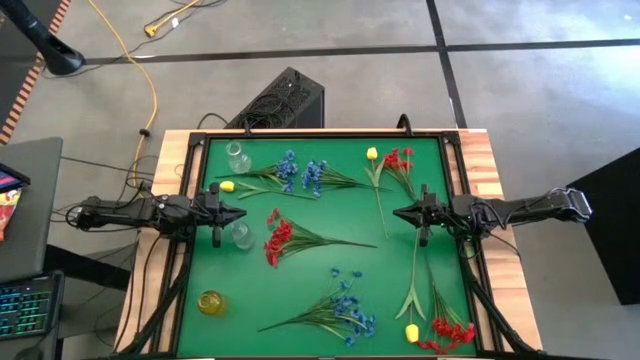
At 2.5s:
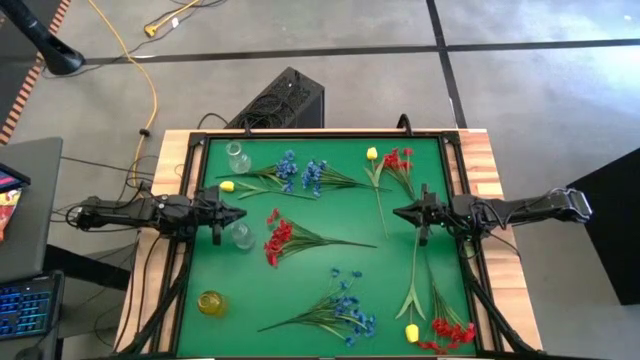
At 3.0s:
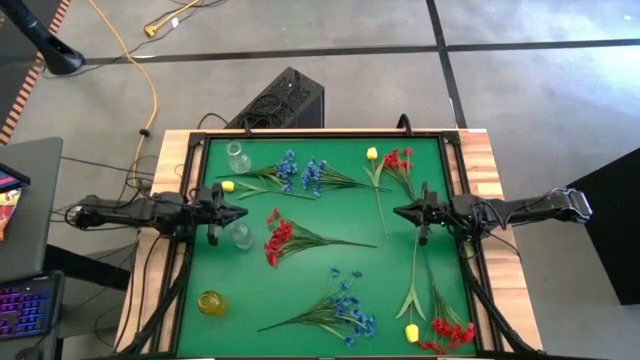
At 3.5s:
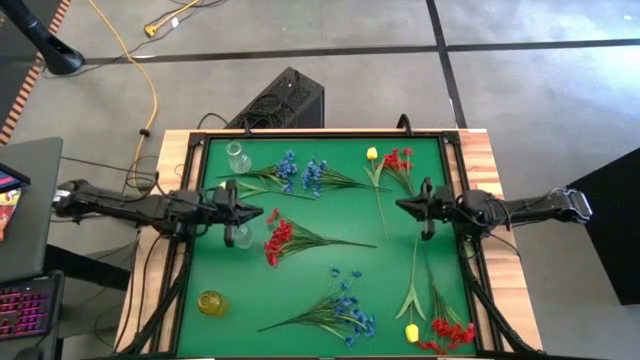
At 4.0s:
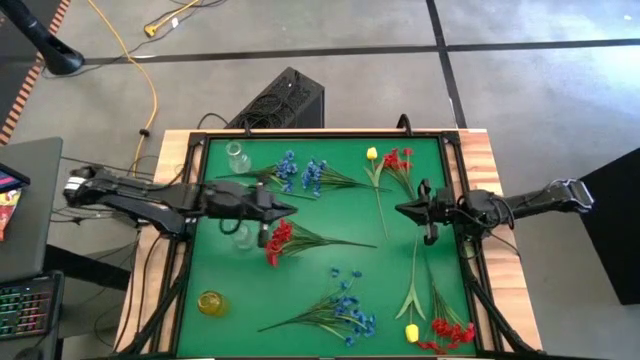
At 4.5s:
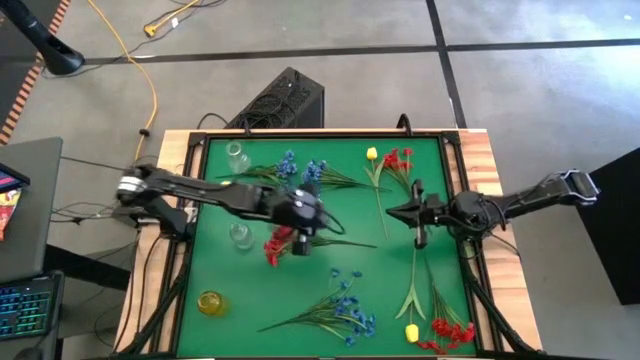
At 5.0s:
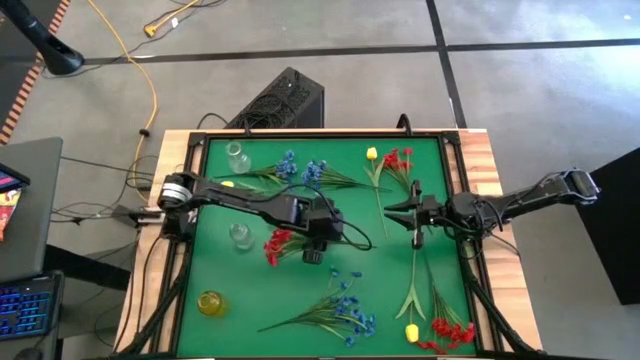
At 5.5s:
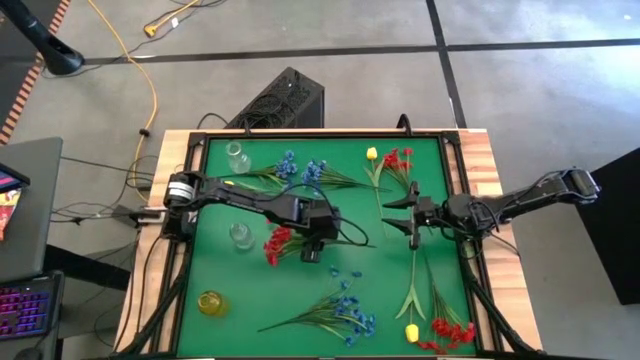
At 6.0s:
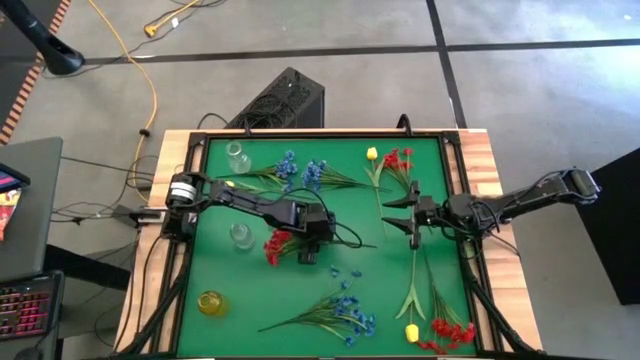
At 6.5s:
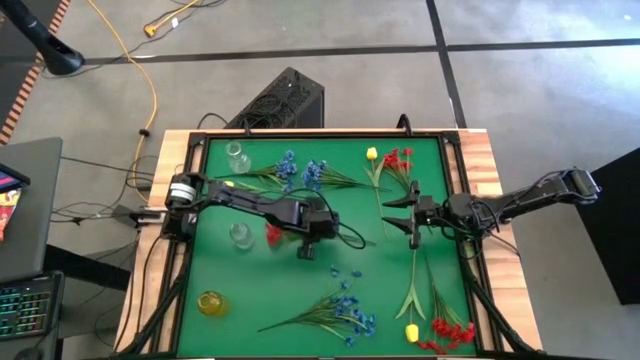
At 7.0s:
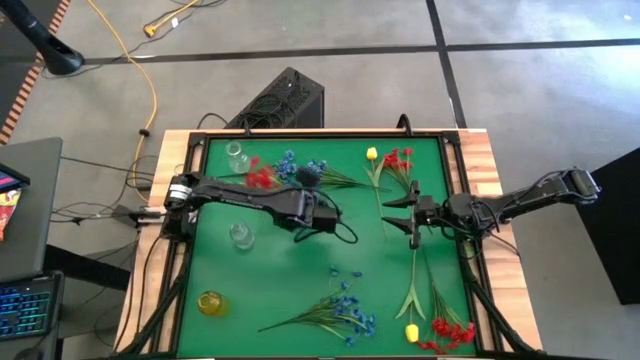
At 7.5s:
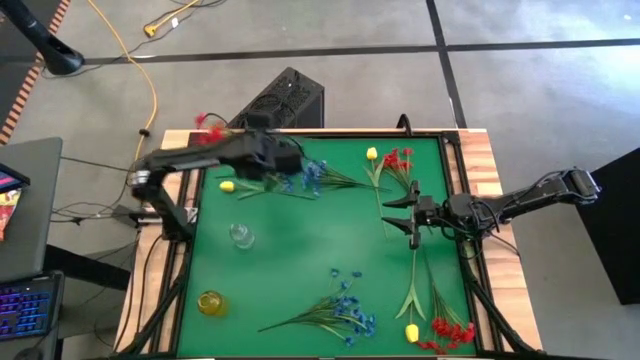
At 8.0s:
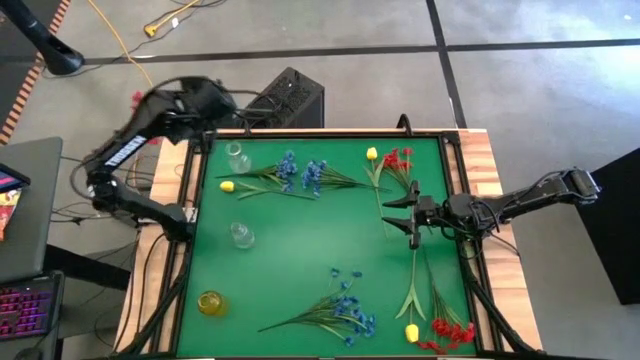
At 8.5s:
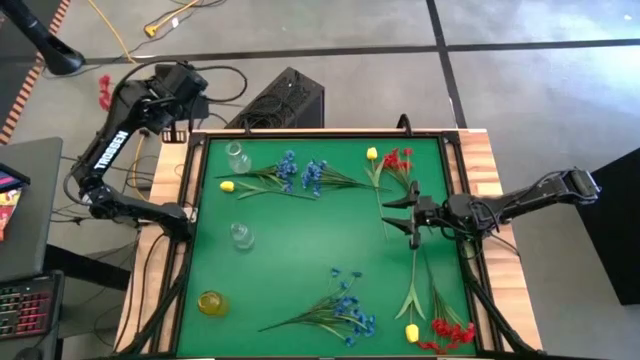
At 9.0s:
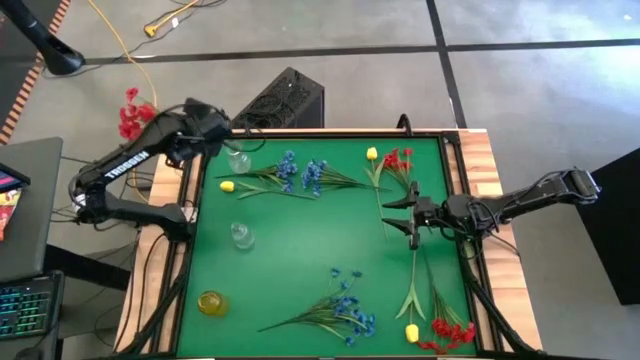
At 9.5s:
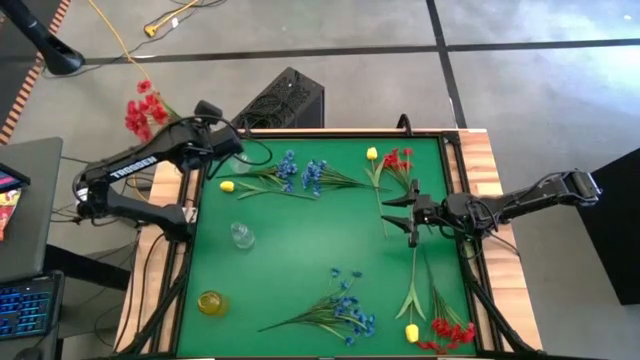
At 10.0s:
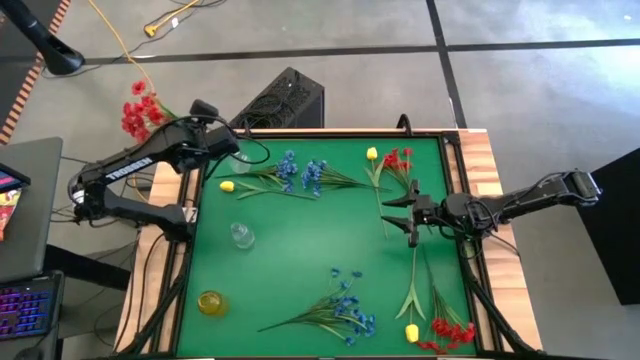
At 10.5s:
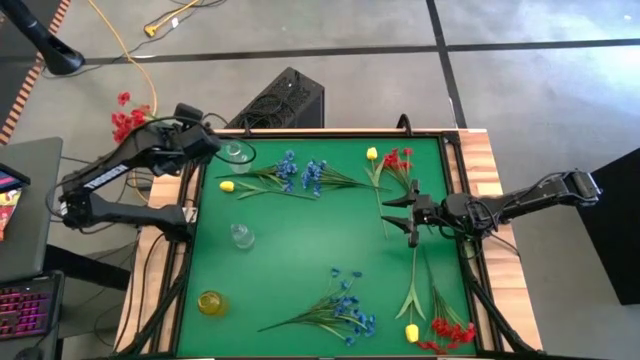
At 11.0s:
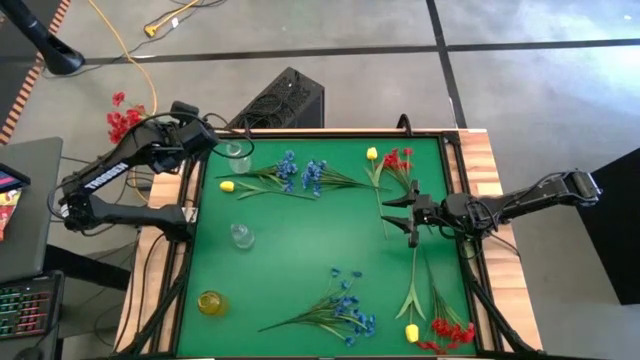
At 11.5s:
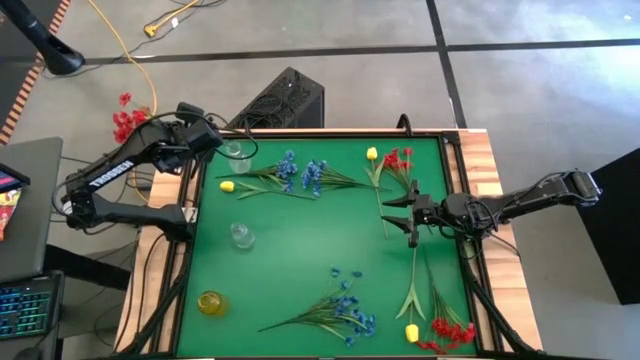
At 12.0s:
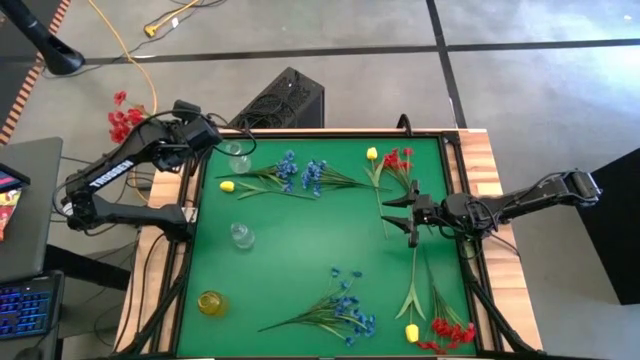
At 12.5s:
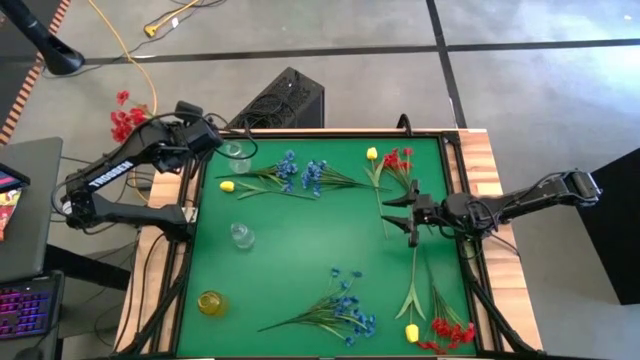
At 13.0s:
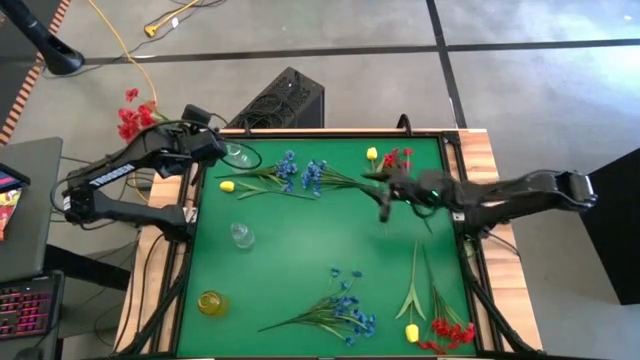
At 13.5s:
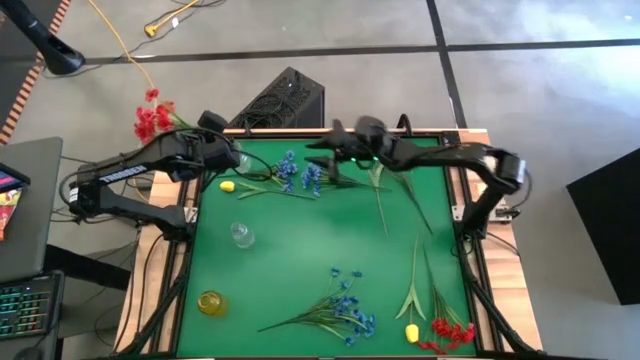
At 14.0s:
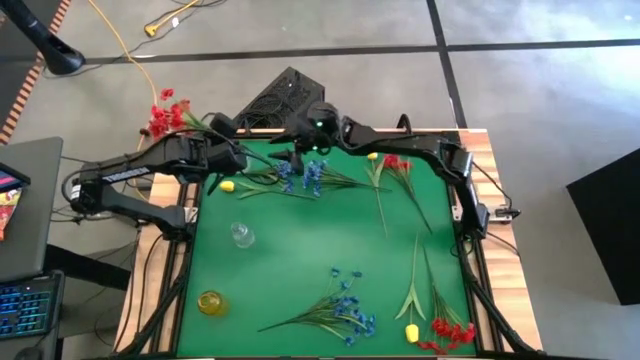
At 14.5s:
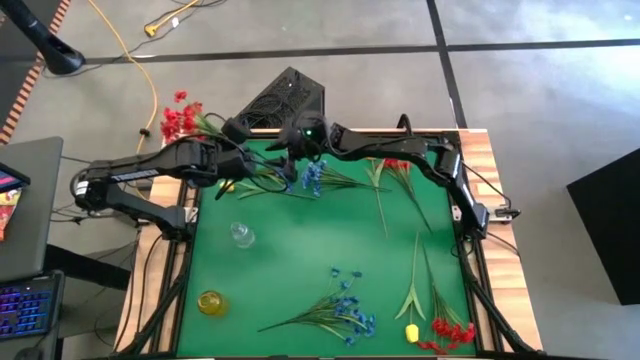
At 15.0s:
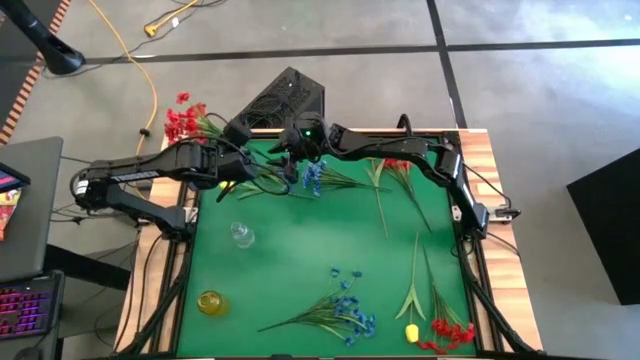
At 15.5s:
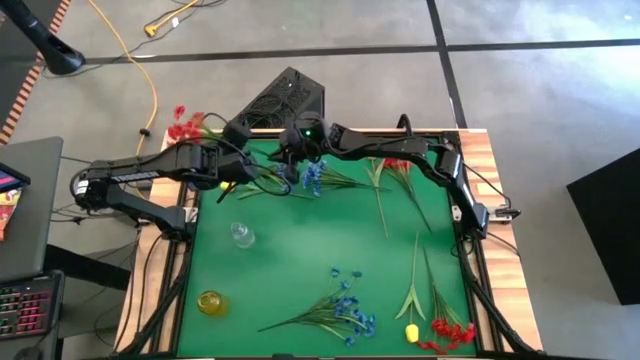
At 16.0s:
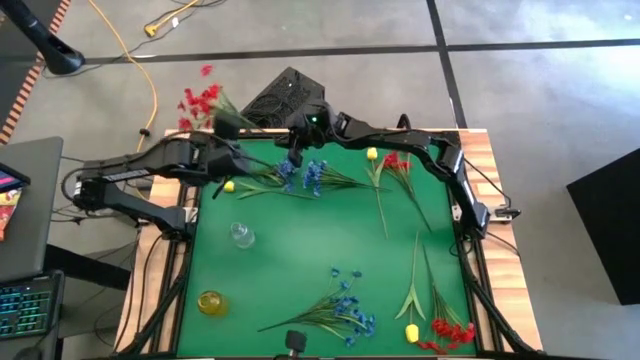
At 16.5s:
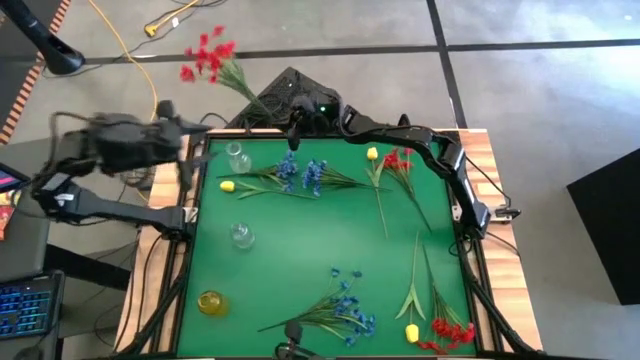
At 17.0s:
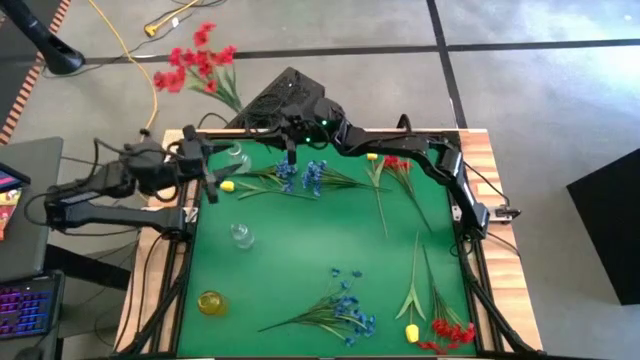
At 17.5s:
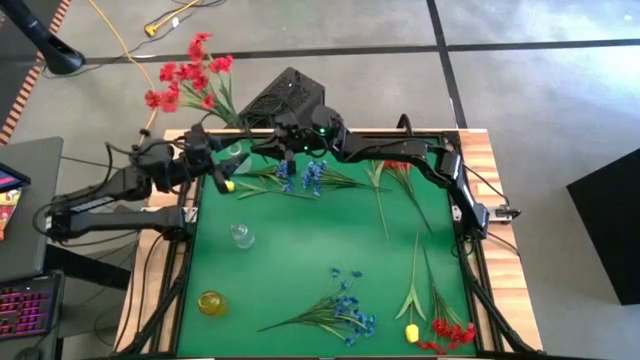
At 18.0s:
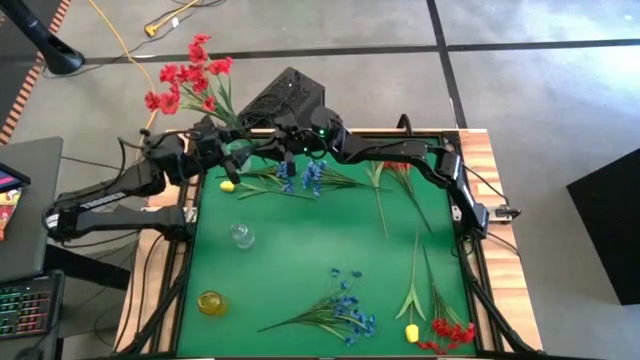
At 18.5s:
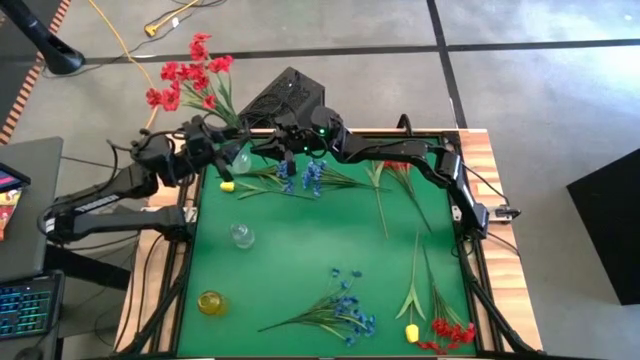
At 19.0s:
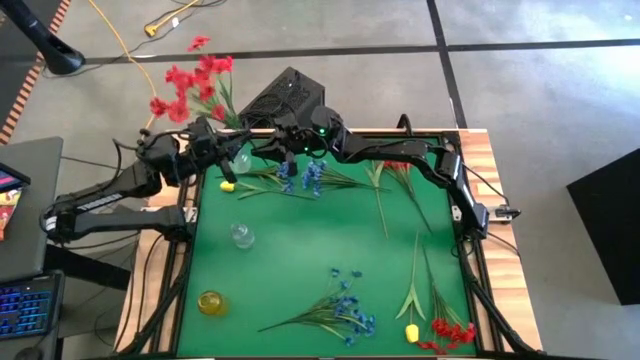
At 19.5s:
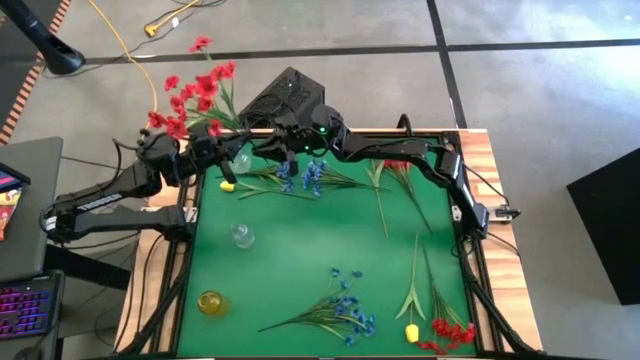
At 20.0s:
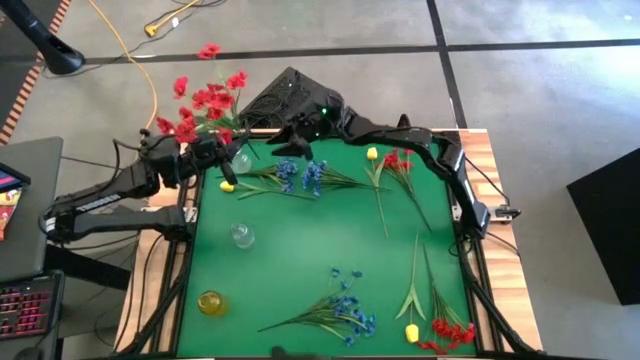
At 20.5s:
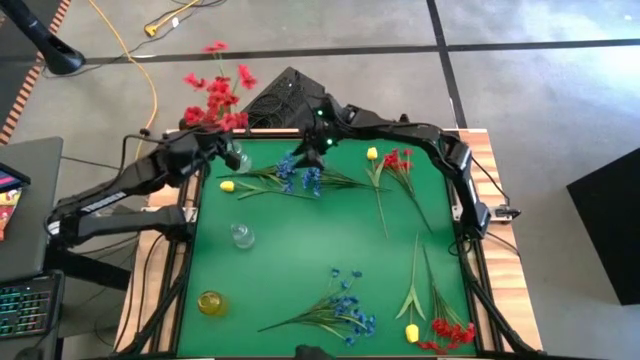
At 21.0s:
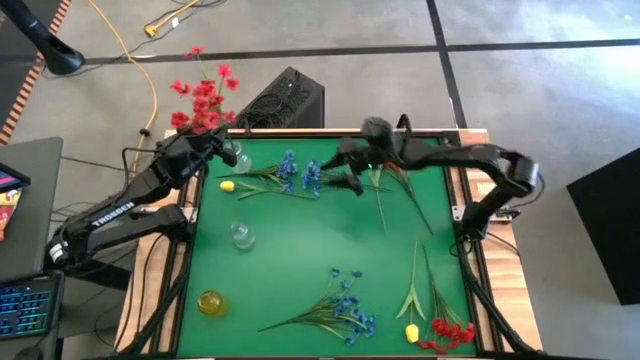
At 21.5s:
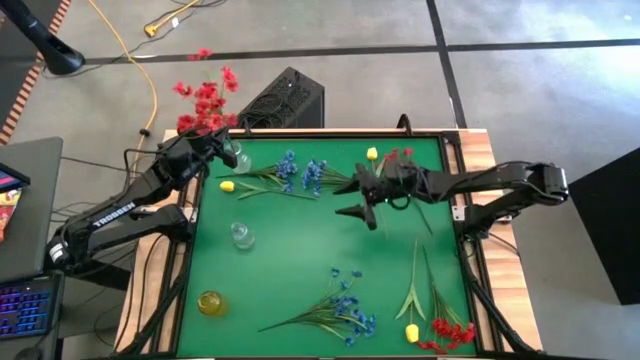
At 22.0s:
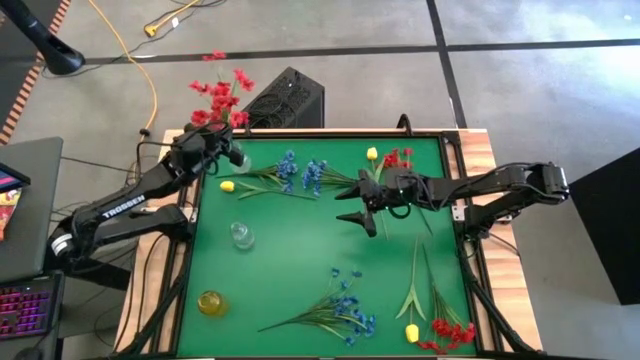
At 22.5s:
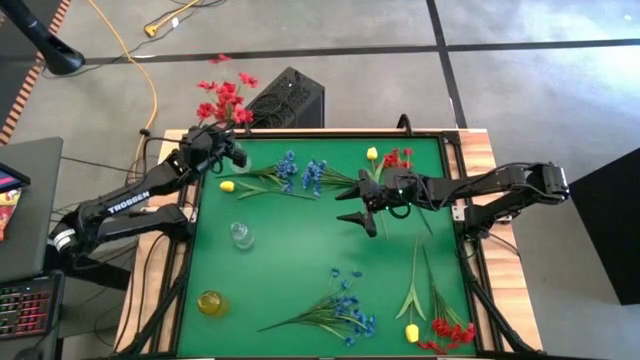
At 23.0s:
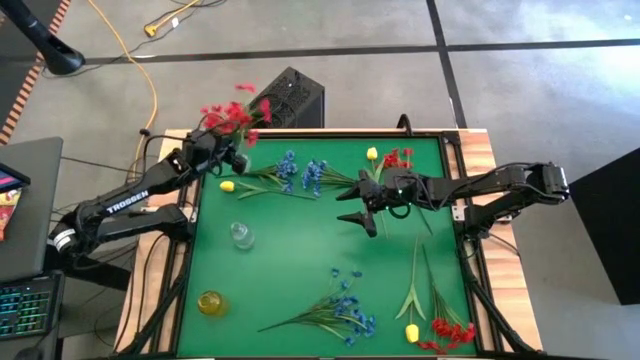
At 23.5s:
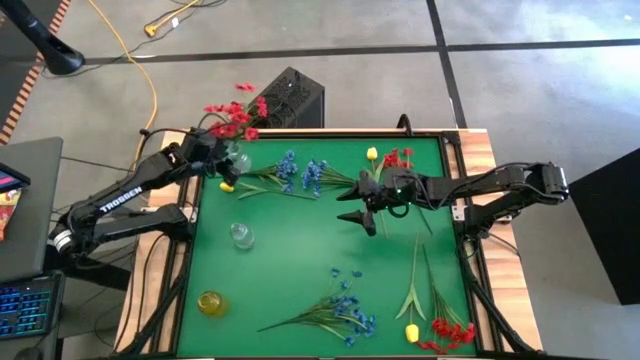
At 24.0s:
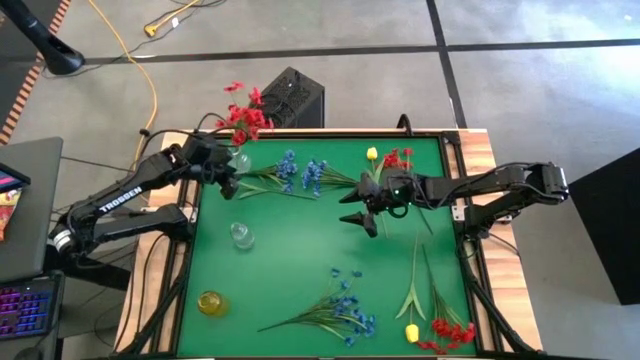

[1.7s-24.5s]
Task: Sort flowers into vase by color
Put the bottom red flowers into the top transparent vase
